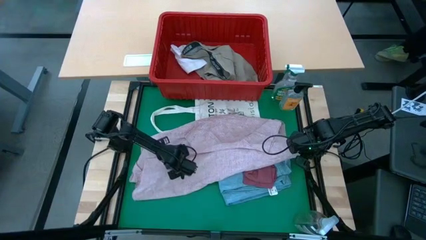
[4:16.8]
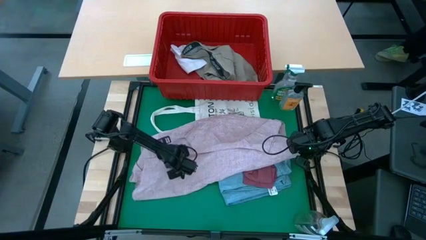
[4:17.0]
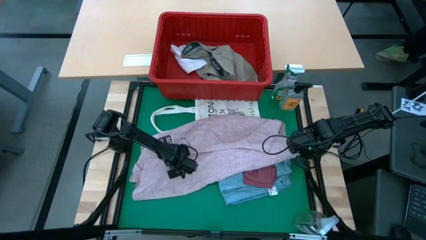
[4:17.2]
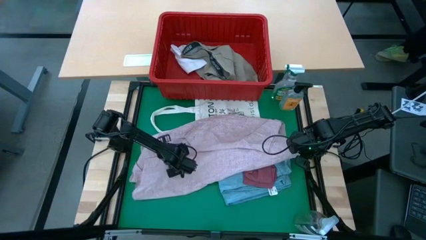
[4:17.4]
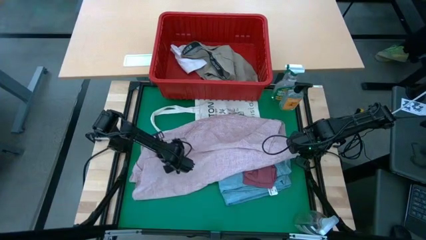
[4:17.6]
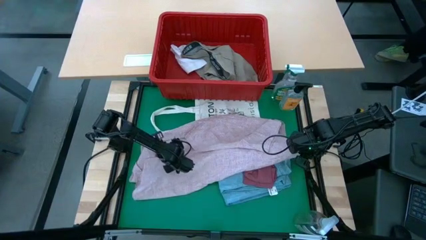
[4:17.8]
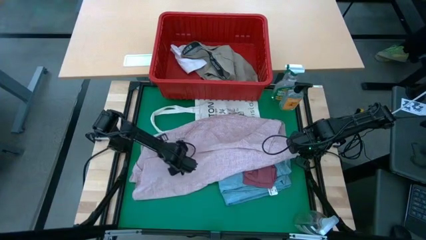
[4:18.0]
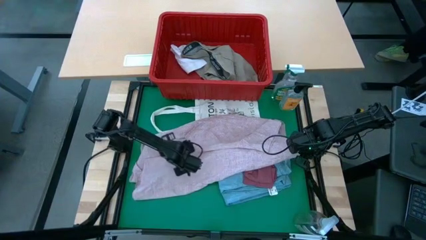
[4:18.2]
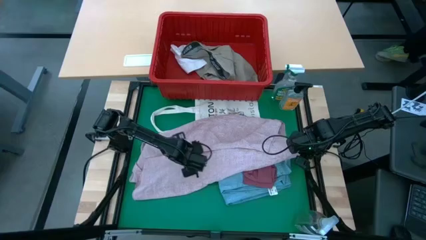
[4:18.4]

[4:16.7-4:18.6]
Task: Fold Laundry from Bin
Fold the pink shirt from the red laundry basket

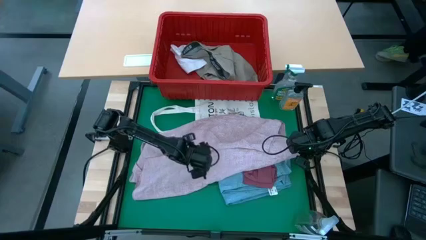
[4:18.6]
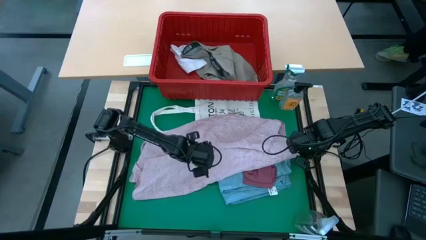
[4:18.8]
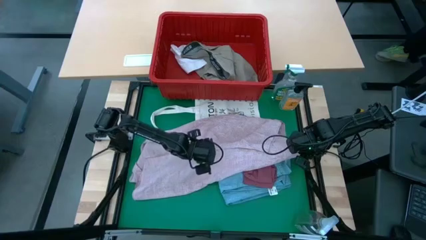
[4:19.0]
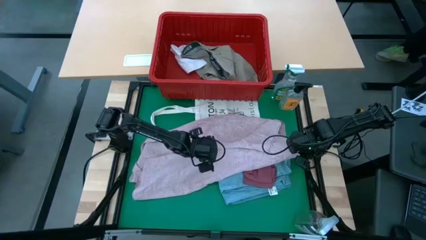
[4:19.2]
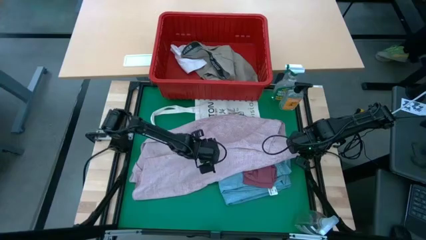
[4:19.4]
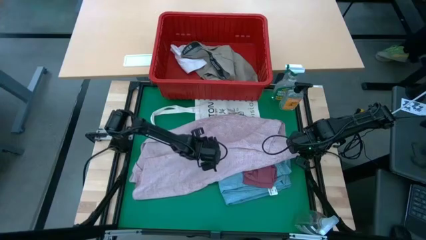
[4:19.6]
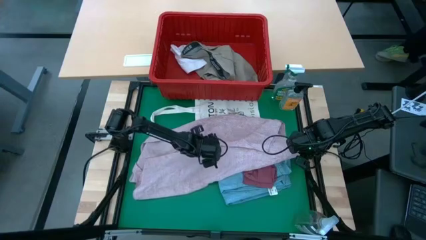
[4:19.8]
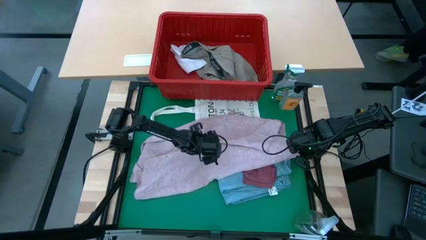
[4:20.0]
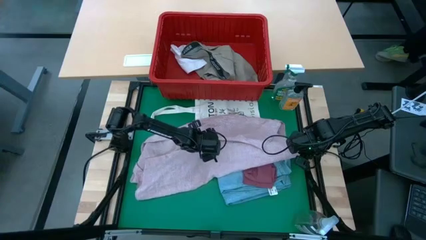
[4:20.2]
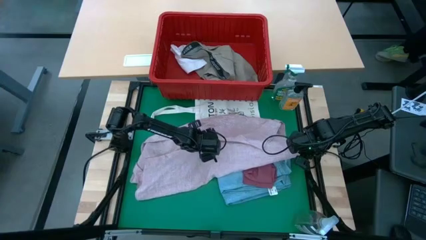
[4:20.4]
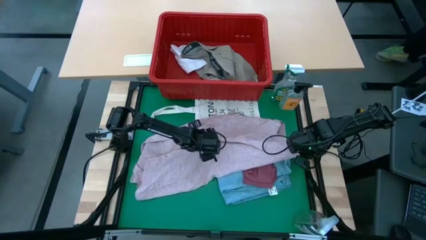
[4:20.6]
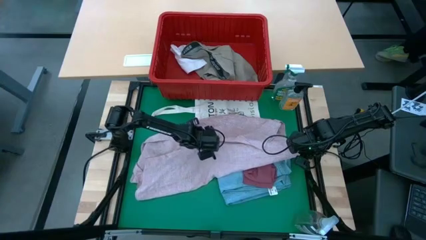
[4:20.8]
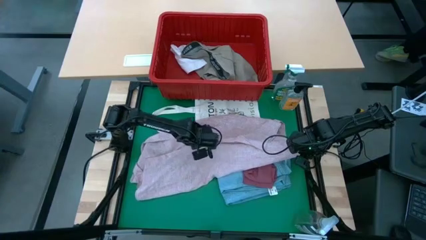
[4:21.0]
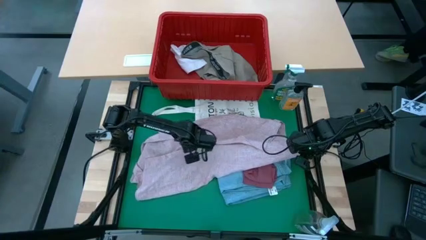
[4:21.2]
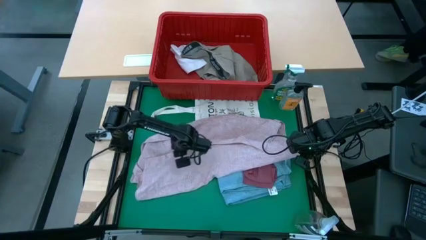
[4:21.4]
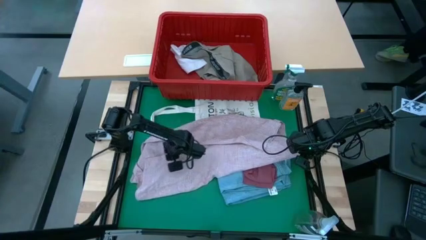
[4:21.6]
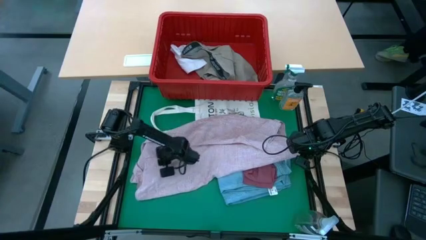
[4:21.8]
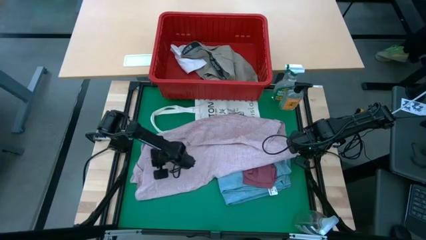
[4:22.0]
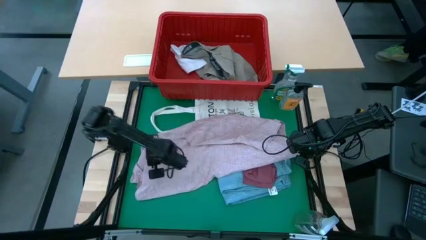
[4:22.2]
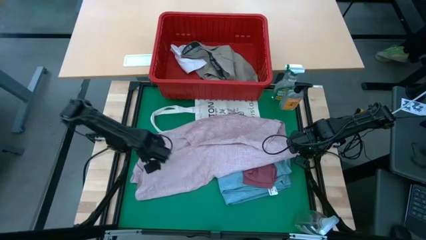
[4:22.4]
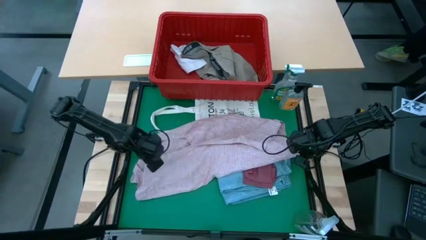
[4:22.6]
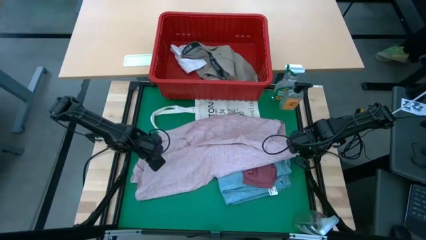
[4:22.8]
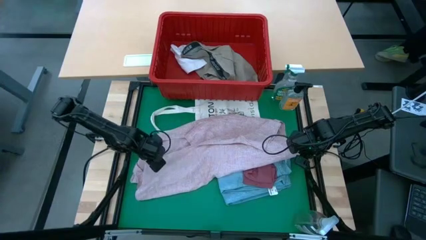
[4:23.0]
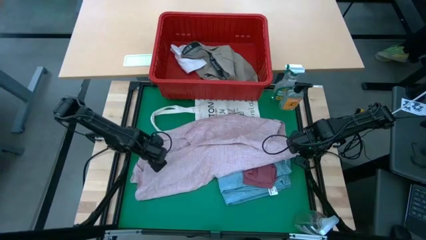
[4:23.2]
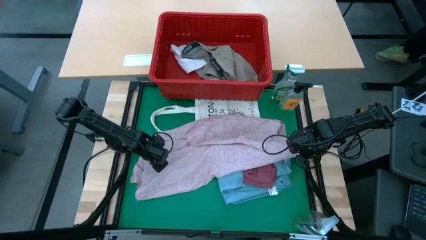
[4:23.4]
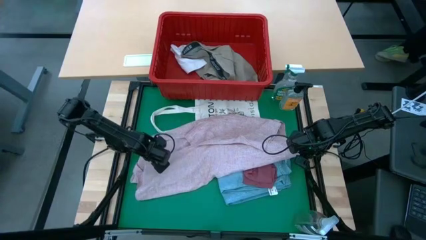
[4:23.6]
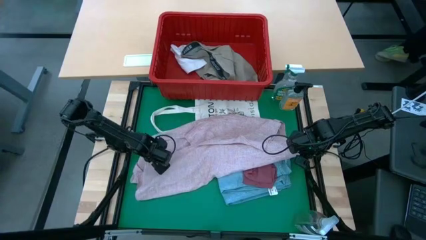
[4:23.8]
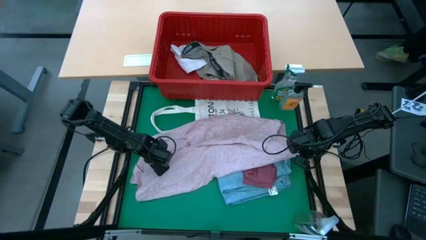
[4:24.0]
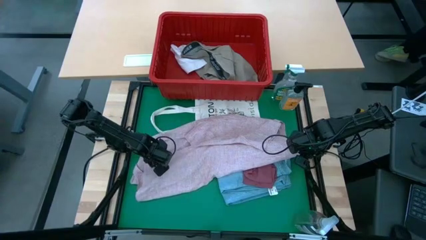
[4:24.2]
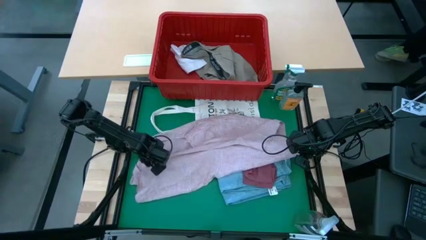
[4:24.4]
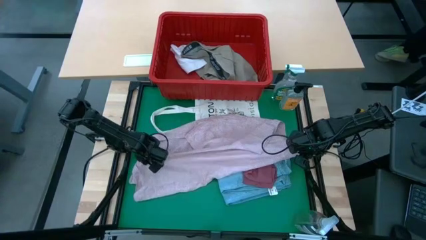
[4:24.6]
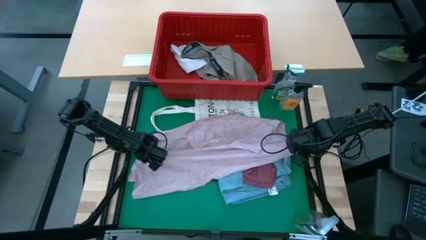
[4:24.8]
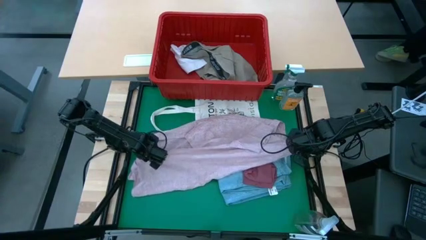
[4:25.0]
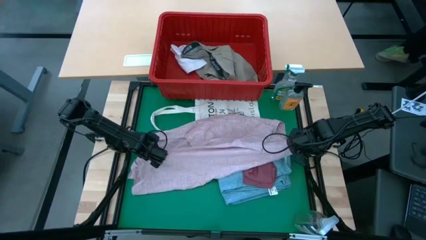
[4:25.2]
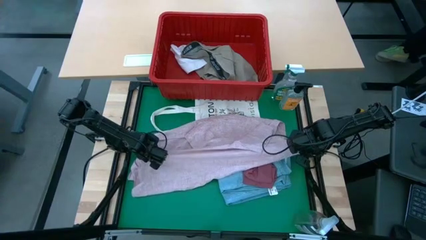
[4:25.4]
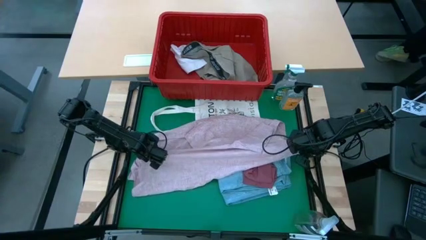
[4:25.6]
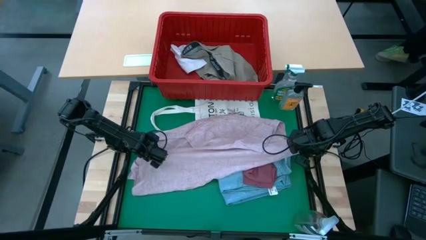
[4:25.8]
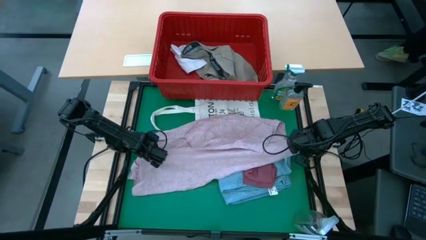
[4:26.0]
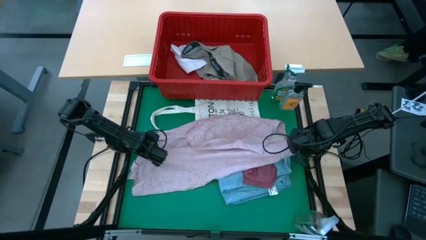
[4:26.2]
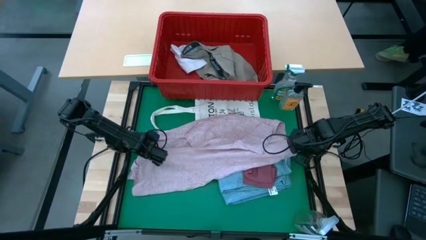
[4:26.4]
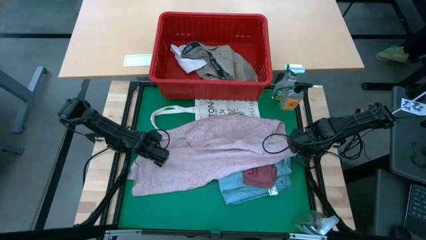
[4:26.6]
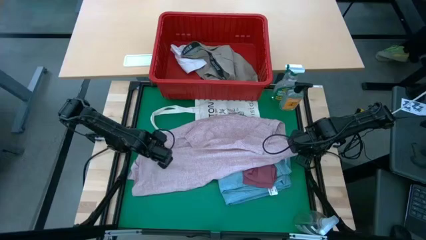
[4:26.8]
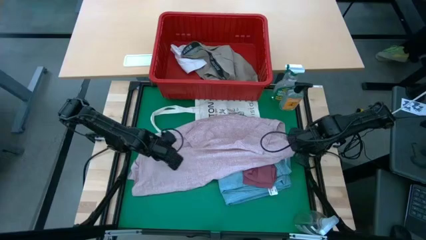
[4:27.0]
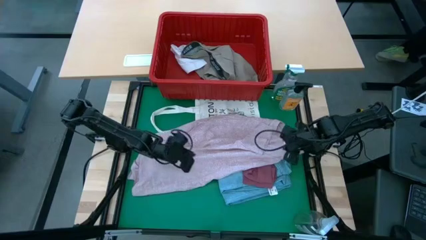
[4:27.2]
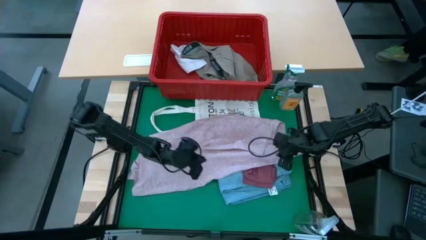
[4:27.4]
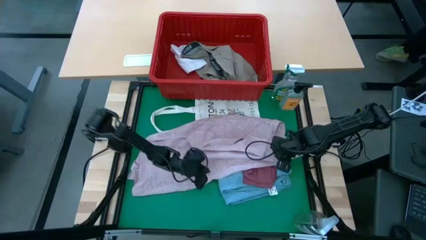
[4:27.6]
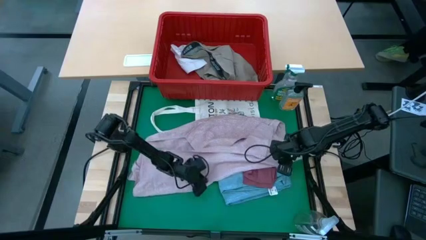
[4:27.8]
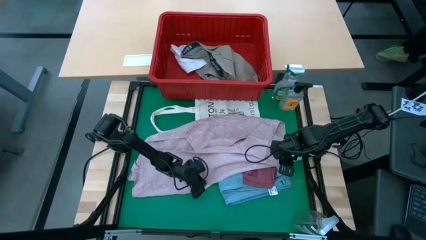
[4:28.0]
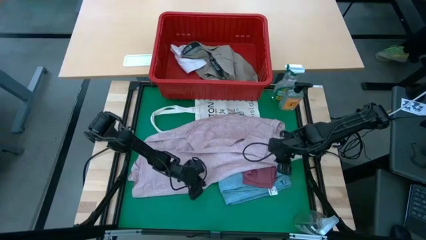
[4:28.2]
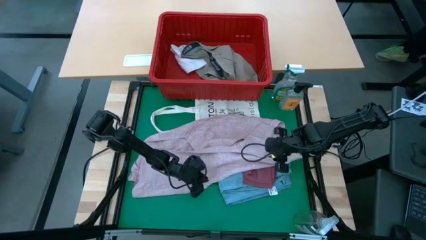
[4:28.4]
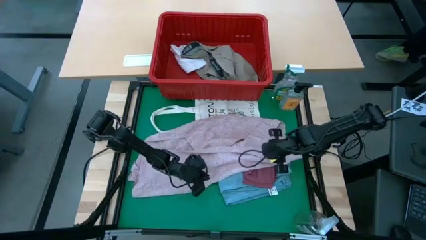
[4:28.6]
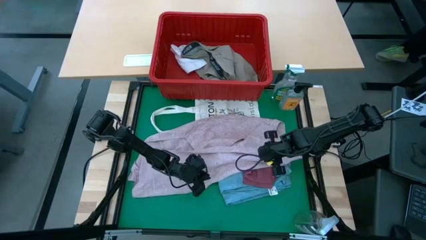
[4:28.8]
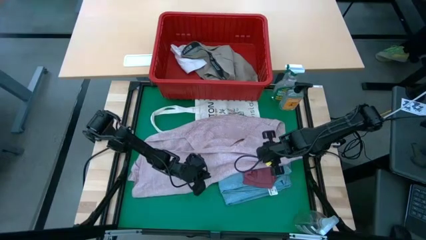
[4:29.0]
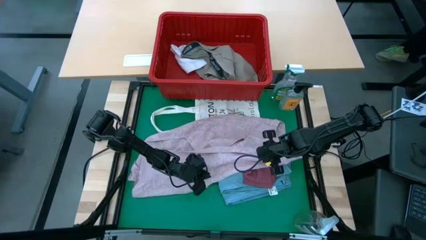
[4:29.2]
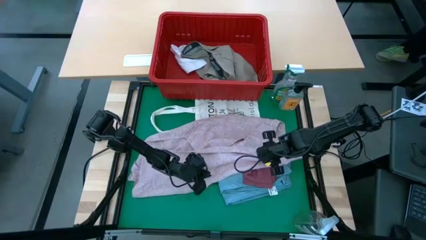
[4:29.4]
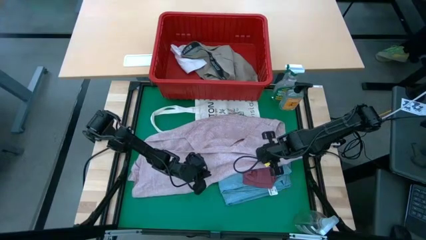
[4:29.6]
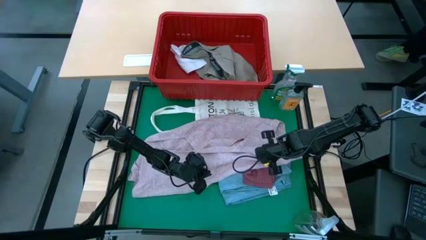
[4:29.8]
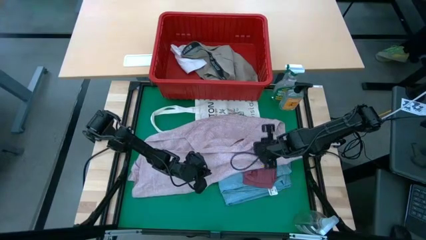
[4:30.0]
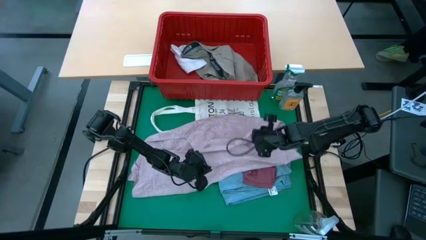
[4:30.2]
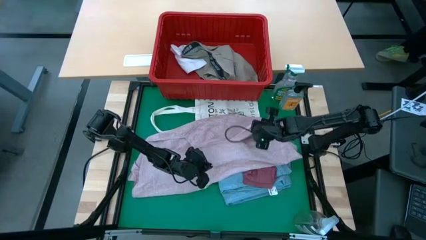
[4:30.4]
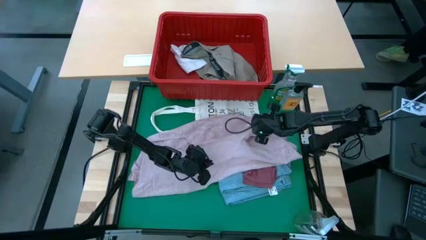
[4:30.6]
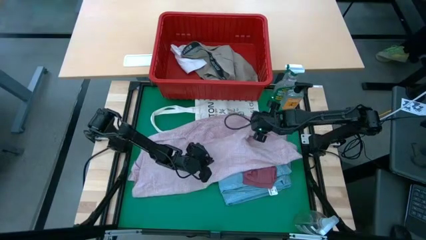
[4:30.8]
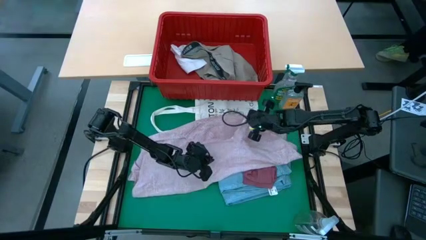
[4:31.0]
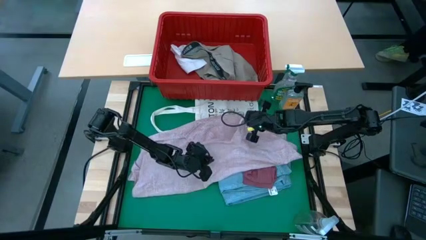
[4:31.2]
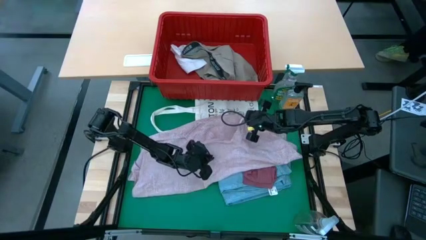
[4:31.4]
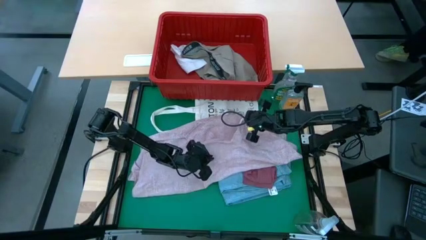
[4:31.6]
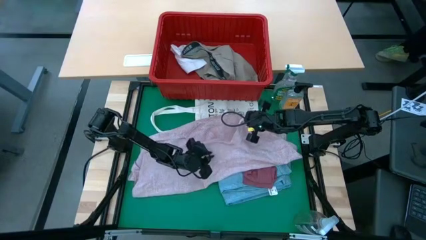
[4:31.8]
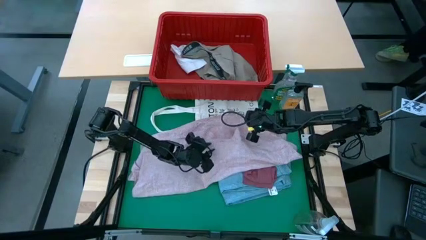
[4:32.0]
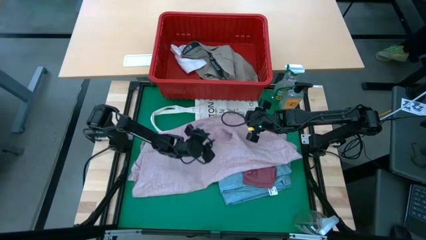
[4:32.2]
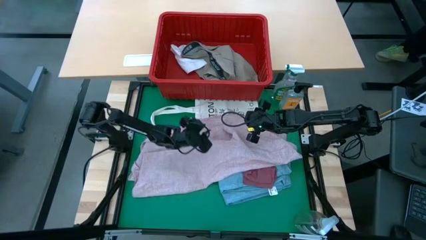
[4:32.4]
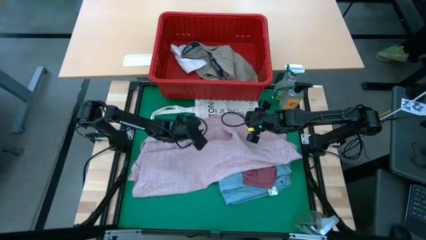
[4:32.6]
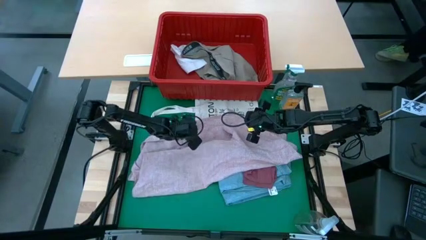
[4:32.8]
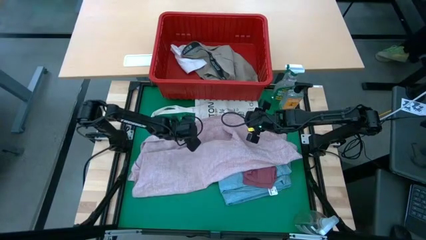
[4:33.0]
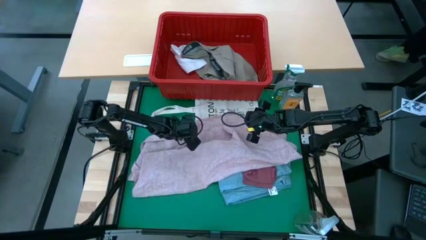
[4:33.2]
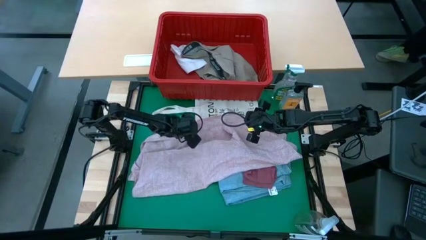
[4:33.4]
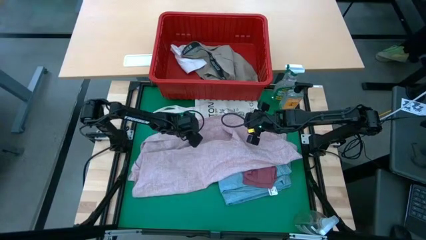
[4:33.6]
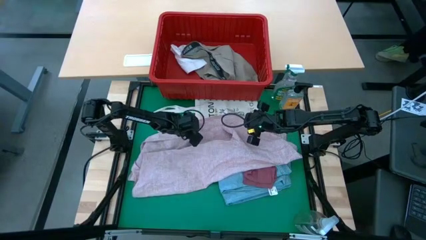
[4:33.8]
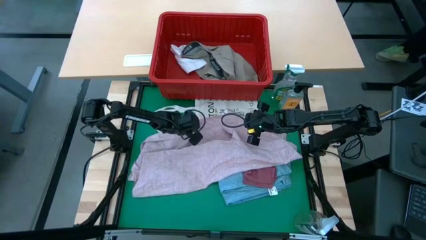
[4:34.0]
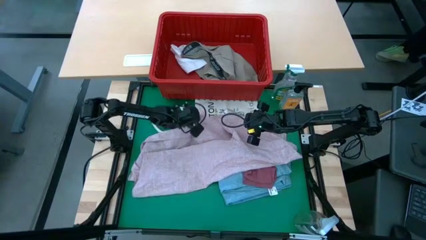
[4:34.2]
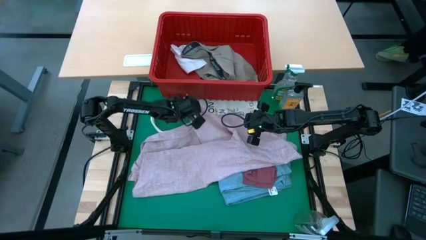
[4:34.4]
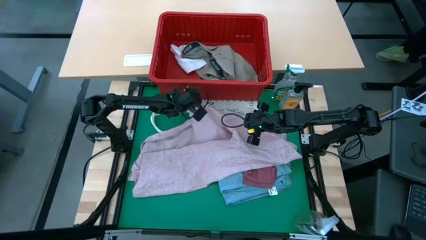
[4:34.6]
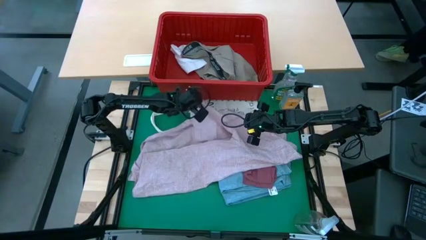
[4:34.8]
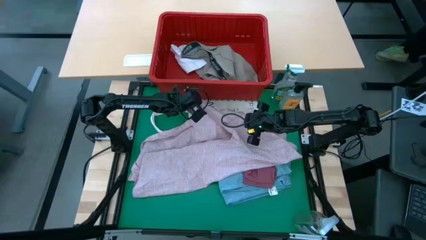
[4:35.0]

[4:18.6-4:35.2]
Fold the pink shirt from the red laundry basket
